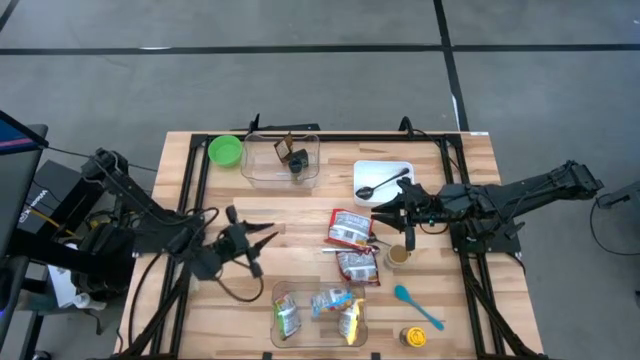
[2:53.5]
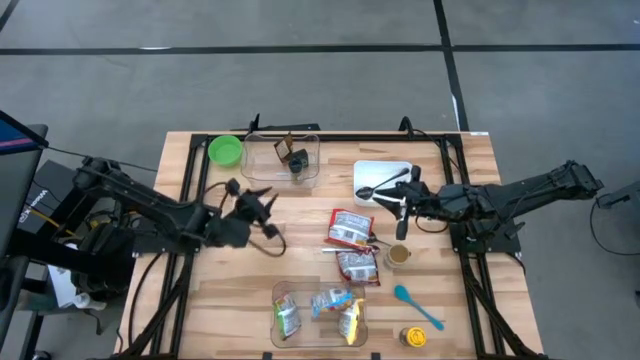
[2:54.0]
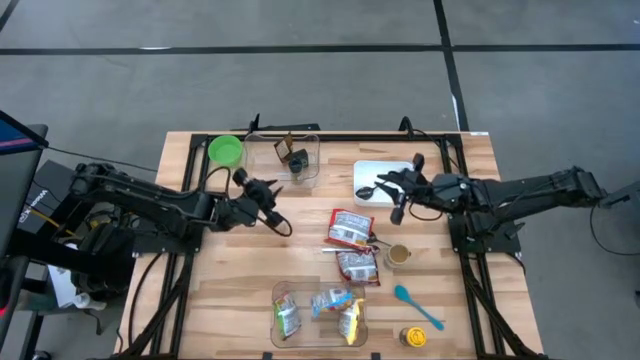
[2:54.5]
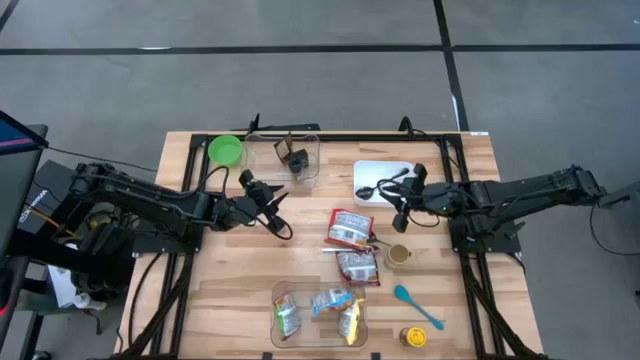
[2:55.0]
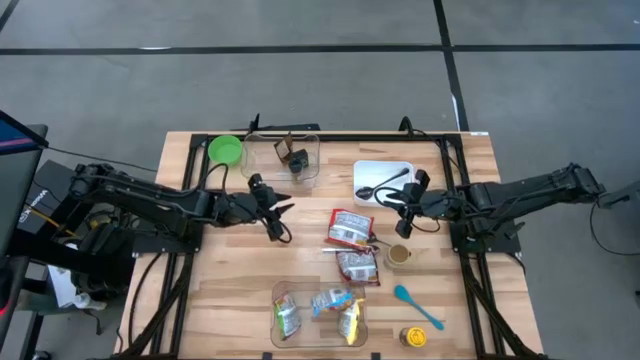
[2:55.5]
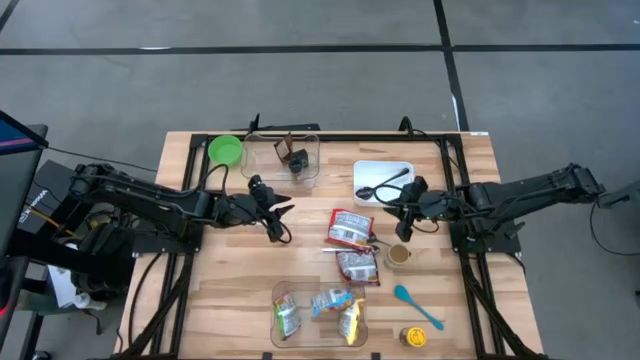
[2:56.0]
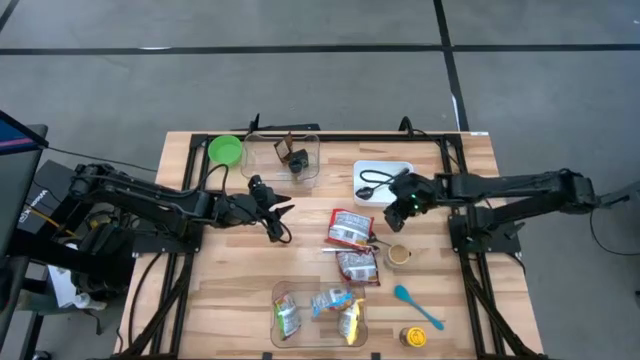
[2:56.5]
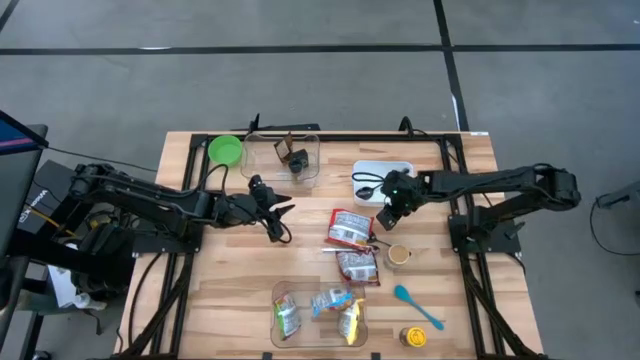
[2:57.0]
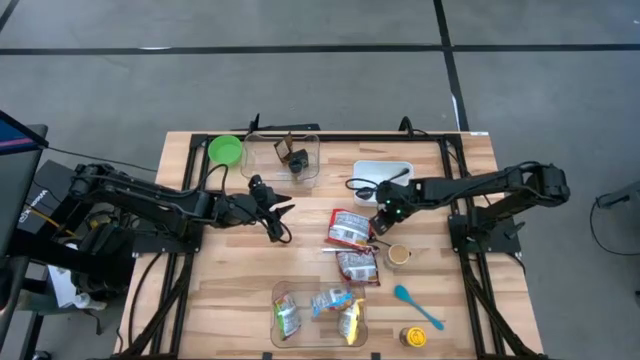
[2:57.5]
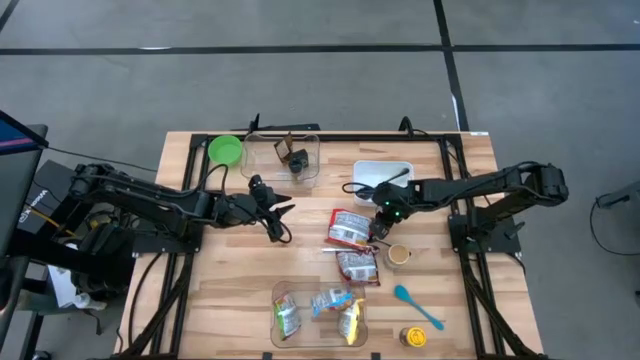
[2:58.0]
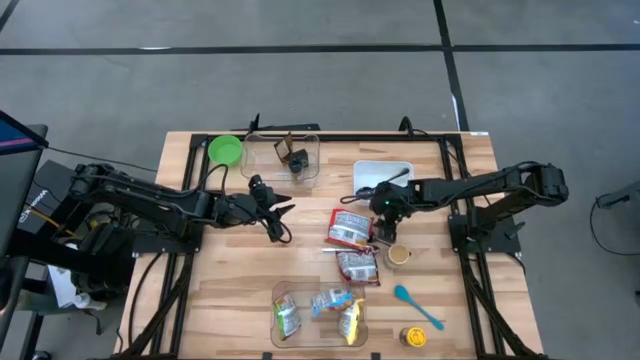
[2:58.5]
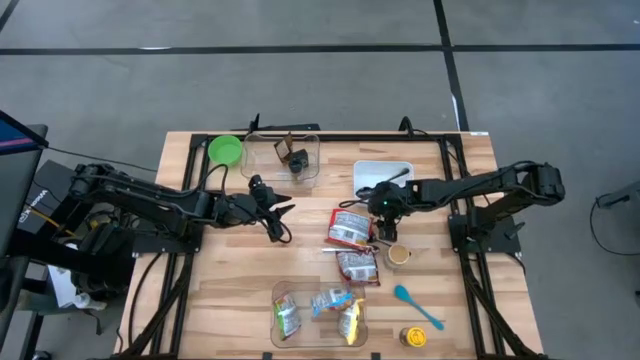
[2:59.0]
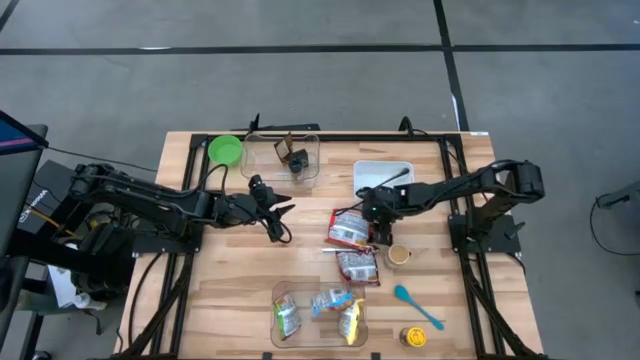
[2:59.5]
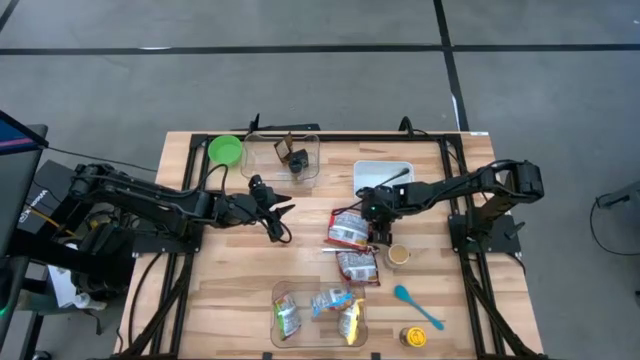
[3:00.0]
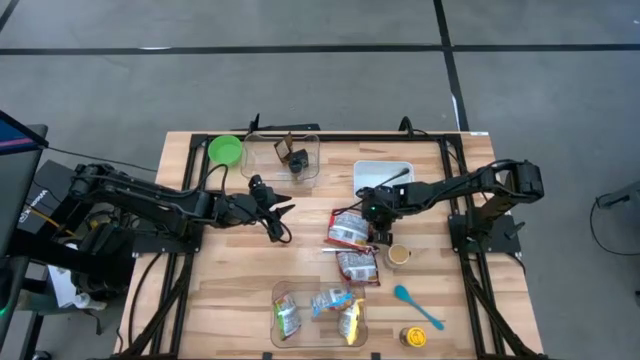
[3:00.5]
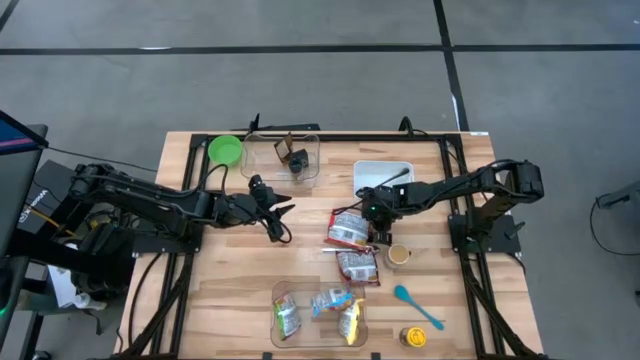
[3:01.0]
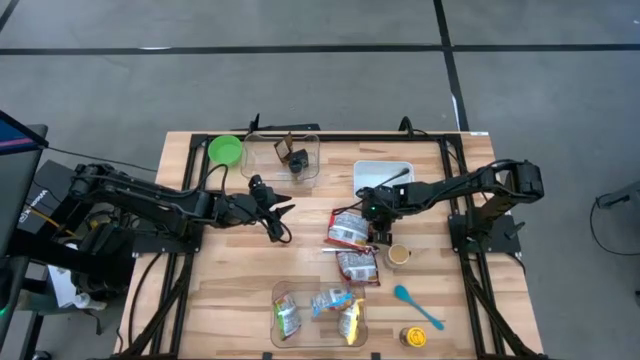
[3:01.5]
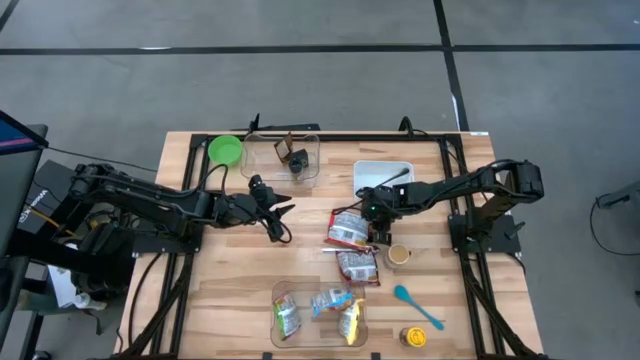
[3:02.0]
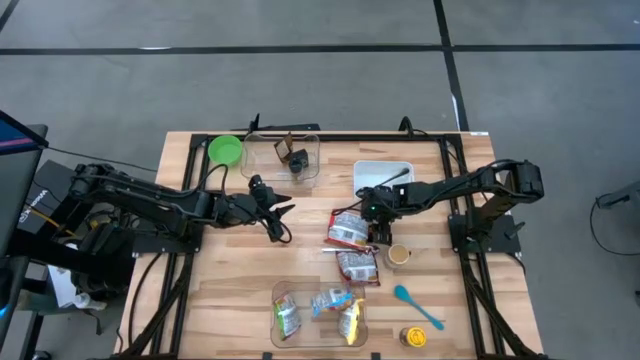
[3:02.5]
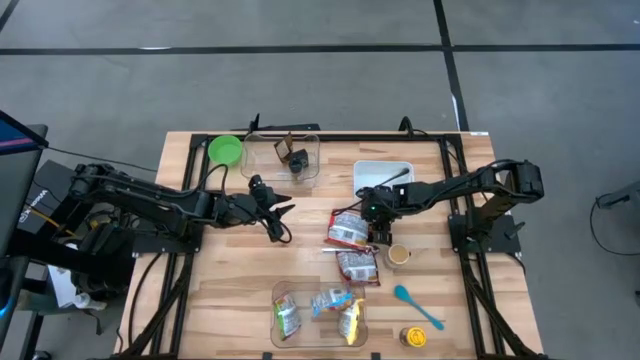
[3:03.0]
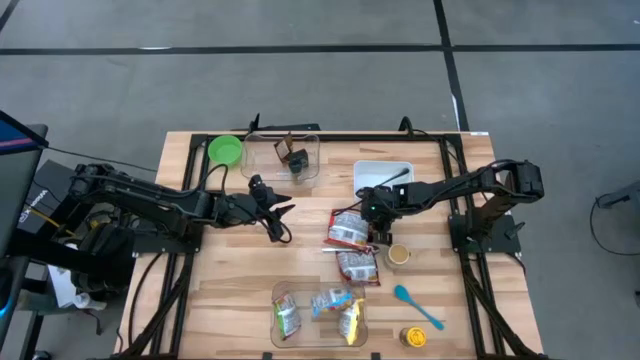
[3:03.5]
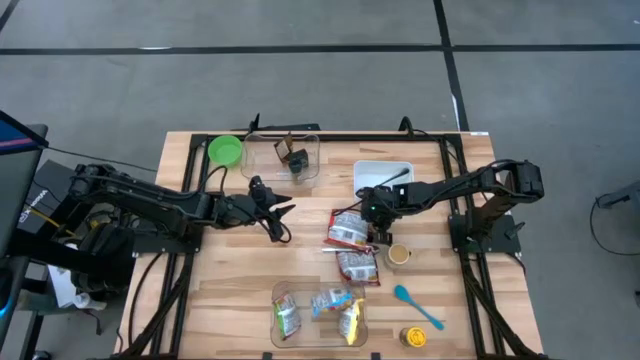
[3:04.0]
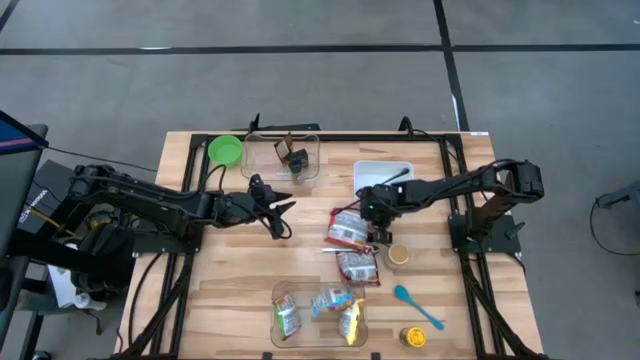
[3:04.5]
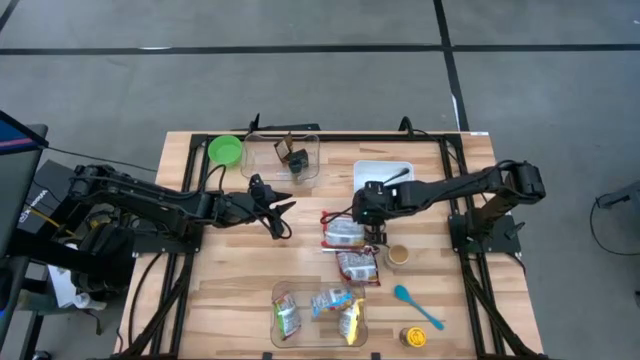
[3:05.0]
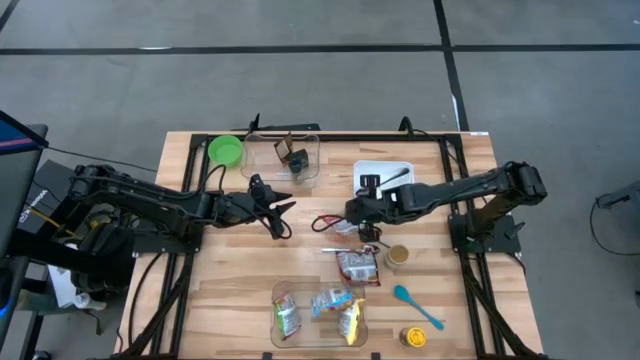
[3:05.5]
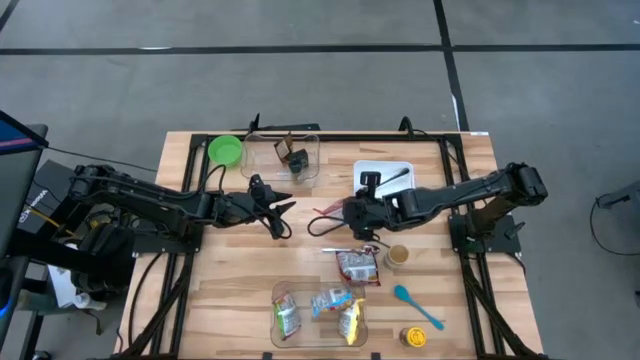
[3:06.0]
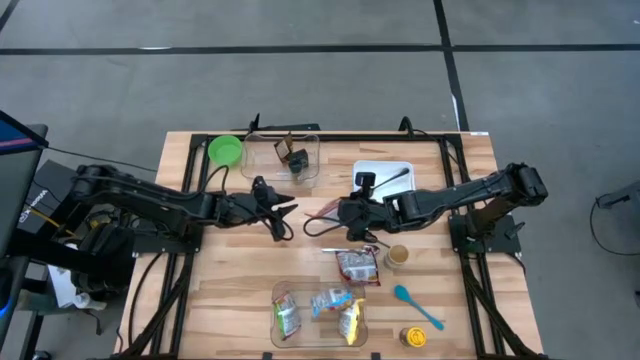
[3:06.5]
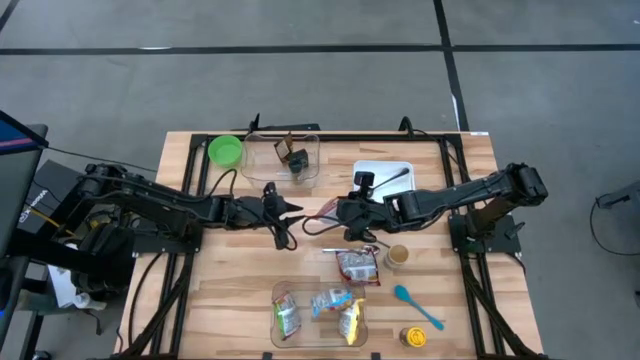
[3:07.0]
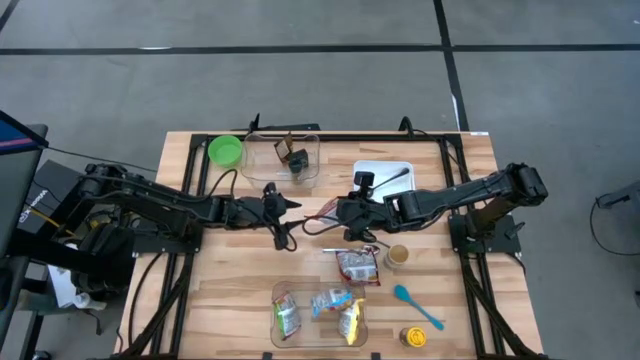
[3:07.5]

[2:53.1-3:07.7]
Task: Pick & Place Food Item
Put the orange noodle pack into the bottom transparent bin

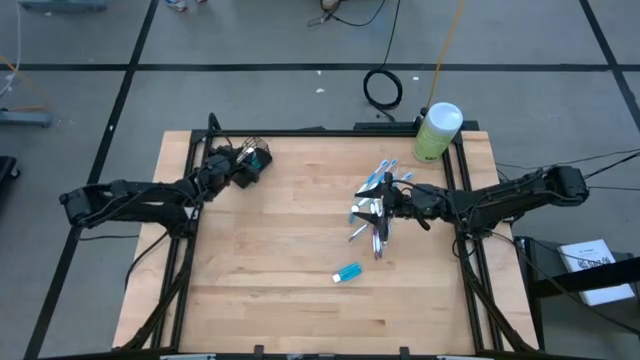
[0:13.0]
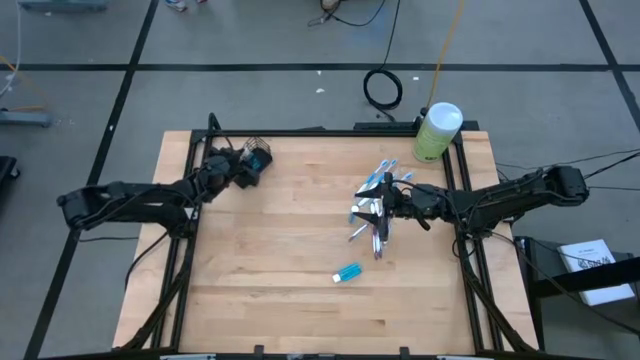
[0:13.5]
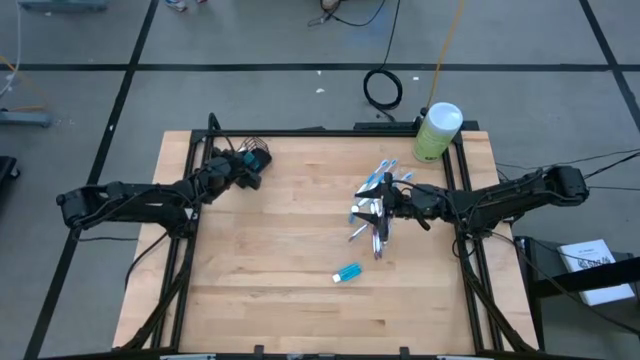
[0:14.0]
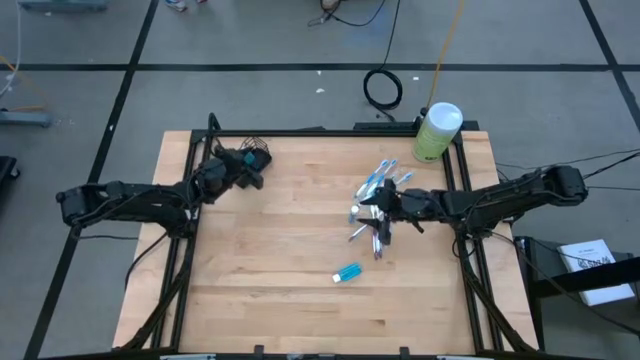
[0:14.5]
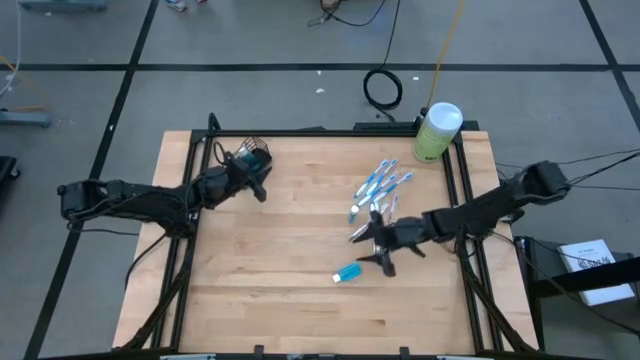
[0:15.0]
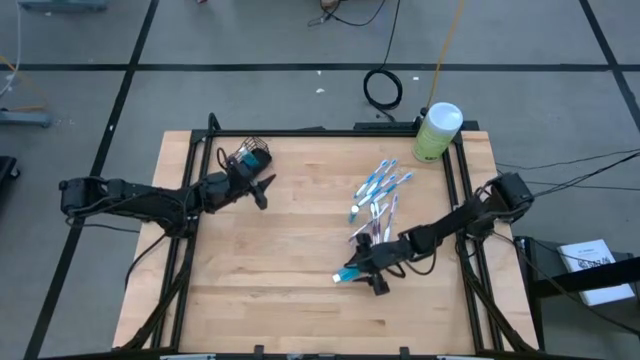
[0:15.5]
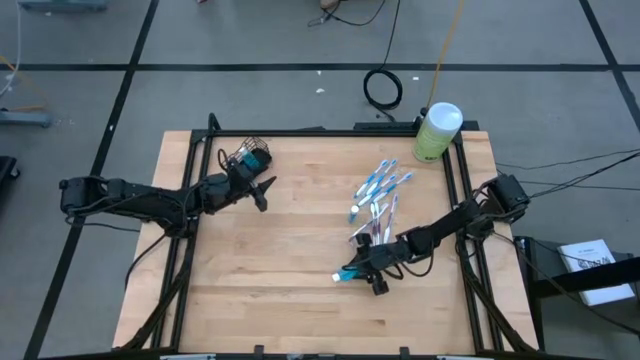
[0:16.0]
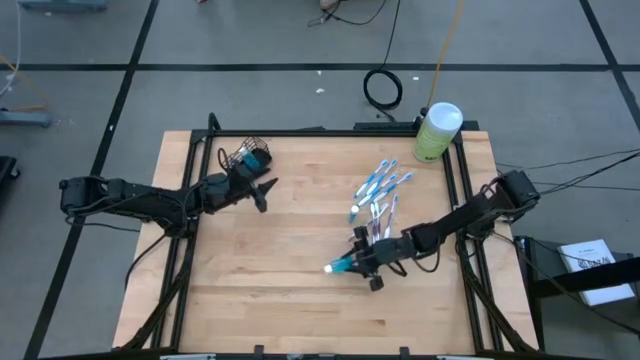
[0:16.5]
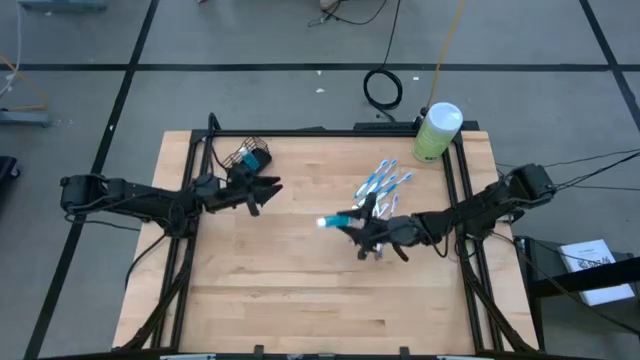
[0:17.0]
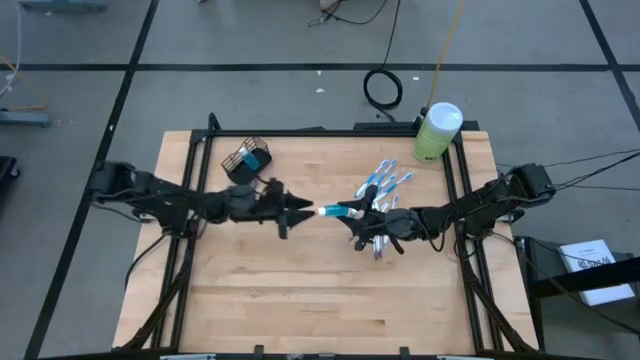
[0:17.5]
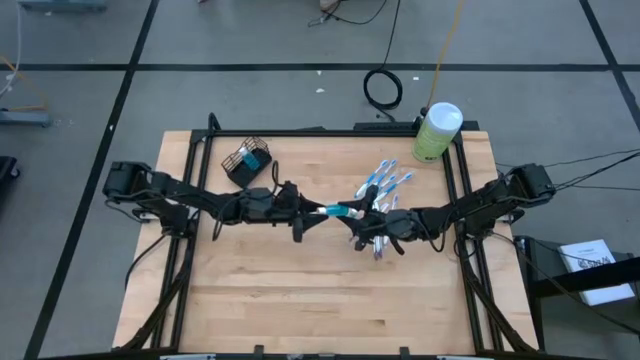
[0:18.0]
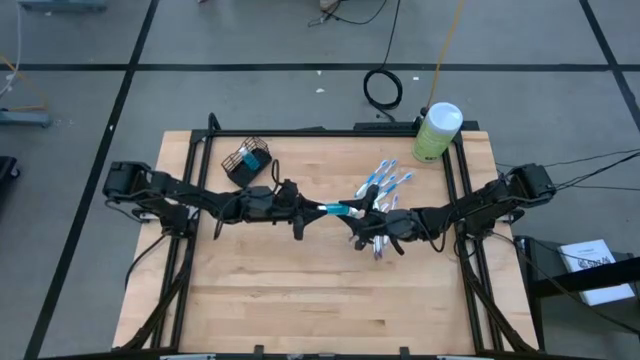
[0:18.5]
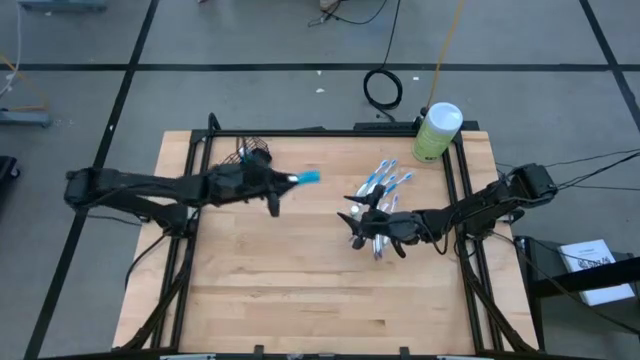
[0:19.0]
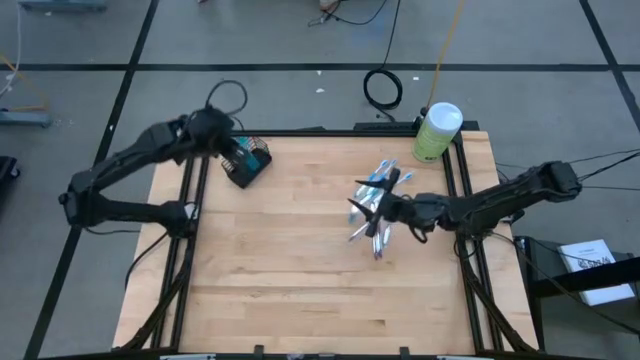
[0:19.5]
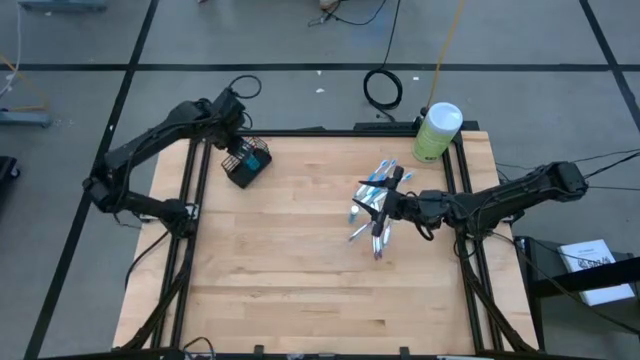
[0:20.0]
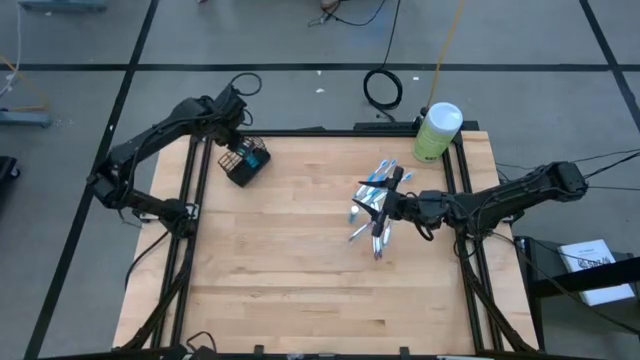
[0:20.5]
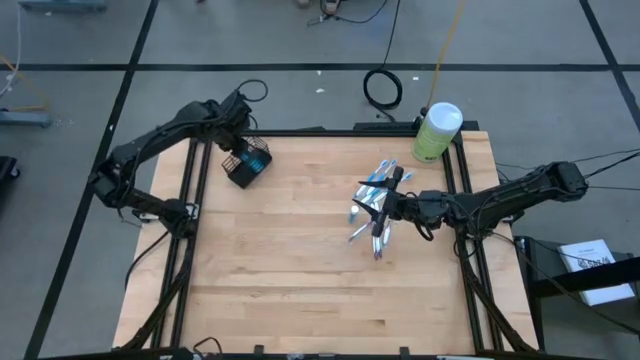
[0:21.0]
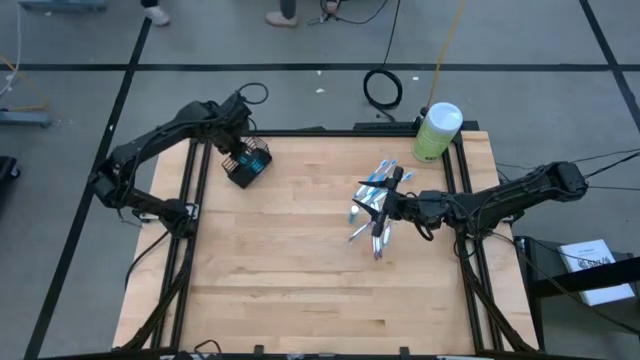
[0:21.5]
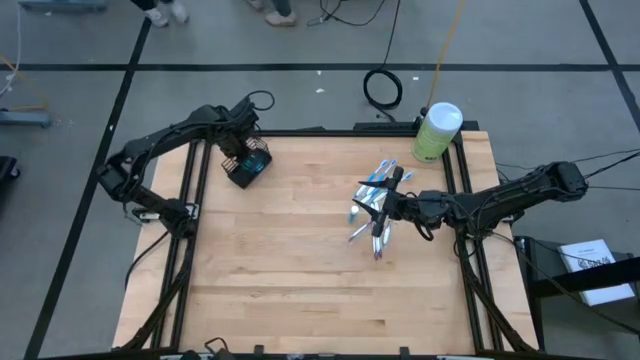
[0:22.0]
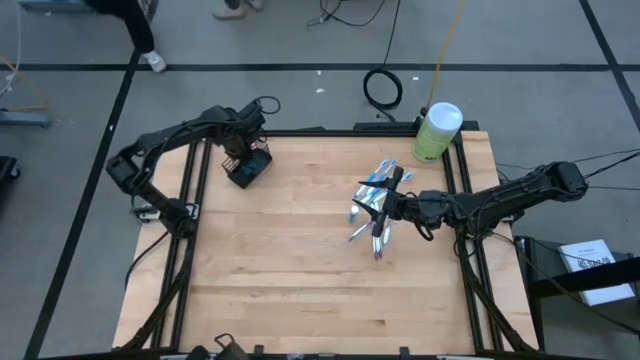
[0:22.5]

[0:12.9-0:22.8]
Task: Pick & Place toothbrushing station
Put the bottom mouthwash into the middle compartment of the wire organizer
